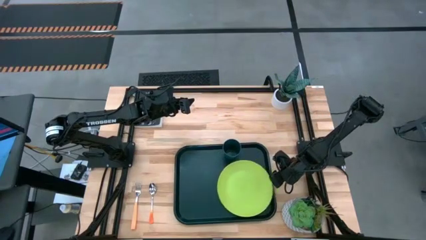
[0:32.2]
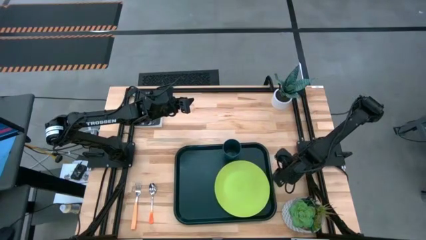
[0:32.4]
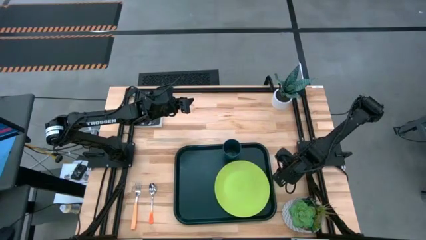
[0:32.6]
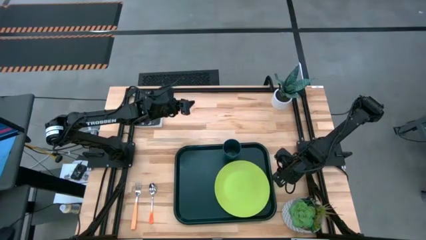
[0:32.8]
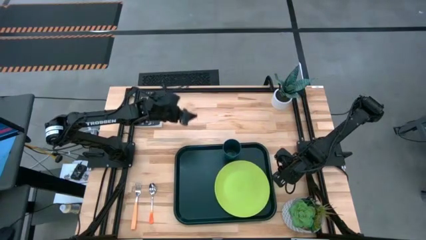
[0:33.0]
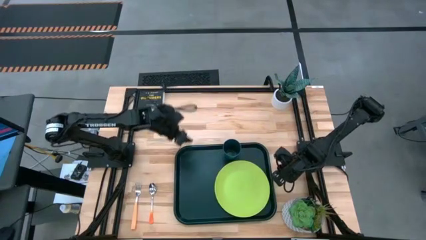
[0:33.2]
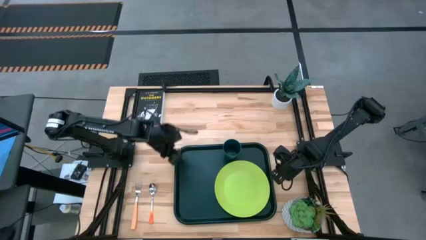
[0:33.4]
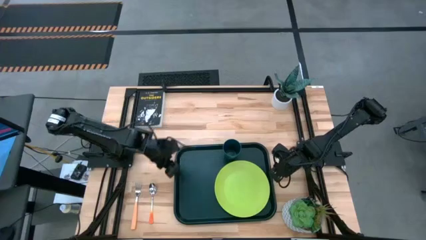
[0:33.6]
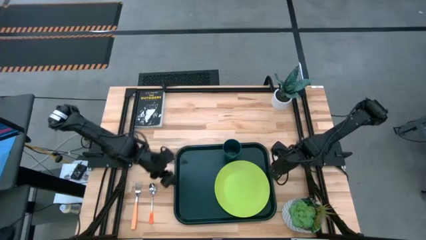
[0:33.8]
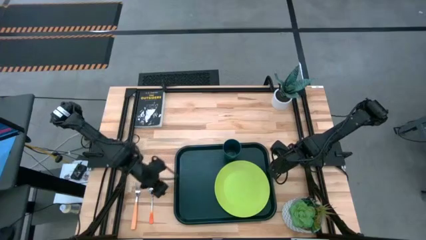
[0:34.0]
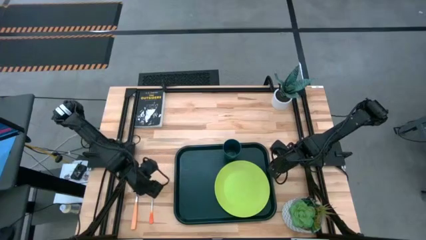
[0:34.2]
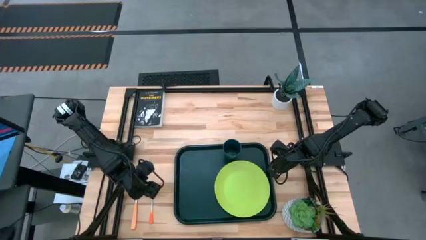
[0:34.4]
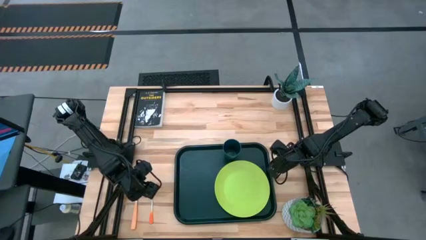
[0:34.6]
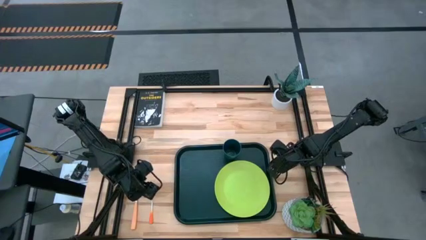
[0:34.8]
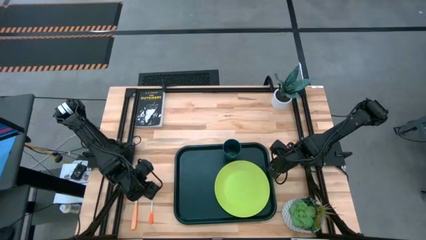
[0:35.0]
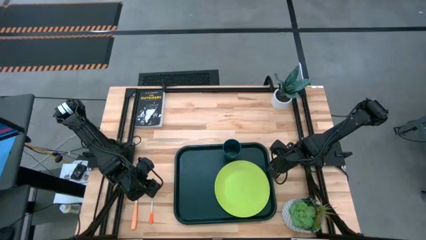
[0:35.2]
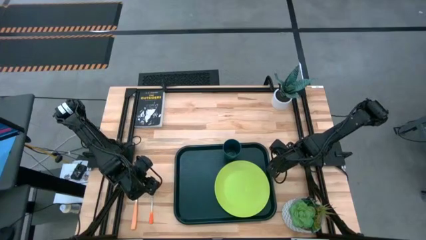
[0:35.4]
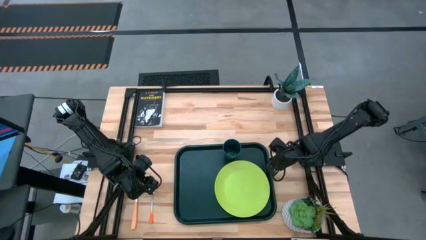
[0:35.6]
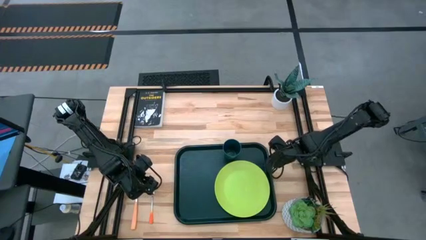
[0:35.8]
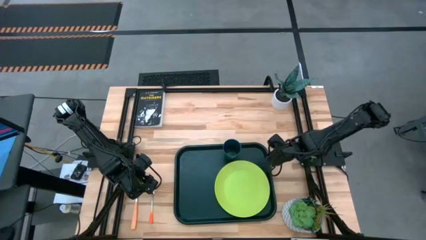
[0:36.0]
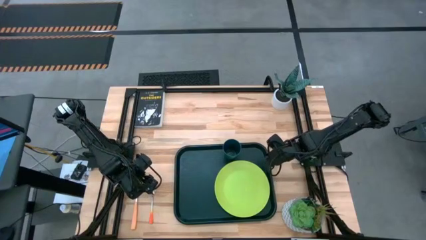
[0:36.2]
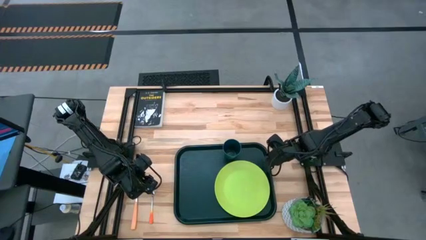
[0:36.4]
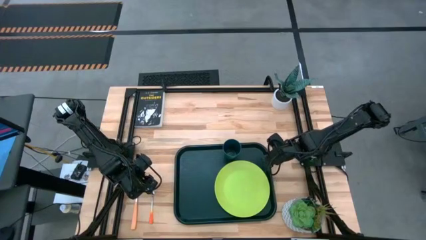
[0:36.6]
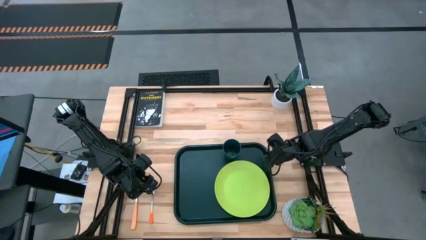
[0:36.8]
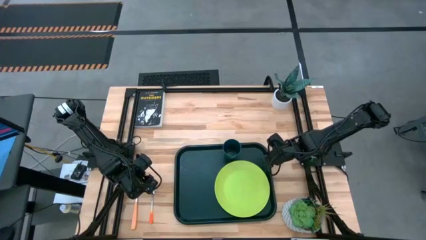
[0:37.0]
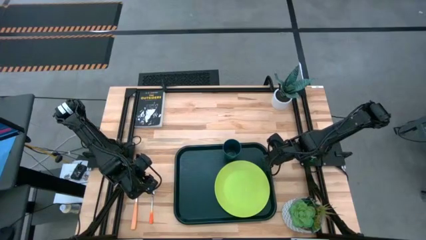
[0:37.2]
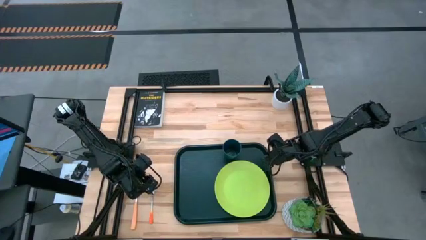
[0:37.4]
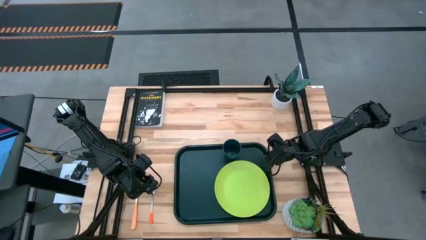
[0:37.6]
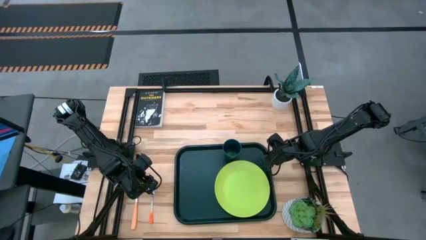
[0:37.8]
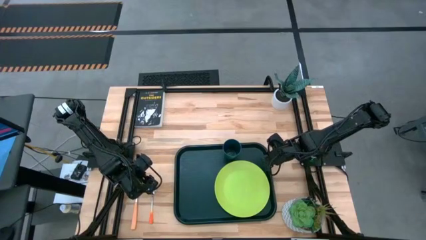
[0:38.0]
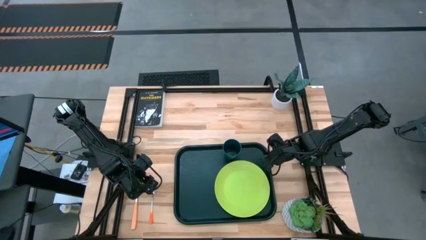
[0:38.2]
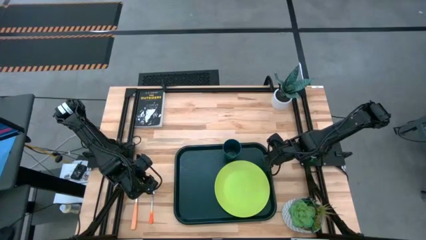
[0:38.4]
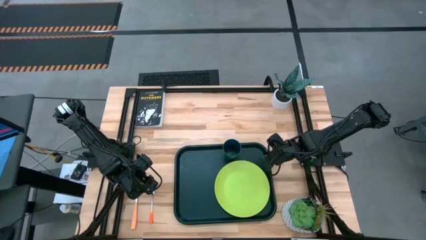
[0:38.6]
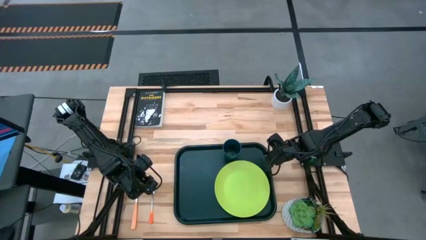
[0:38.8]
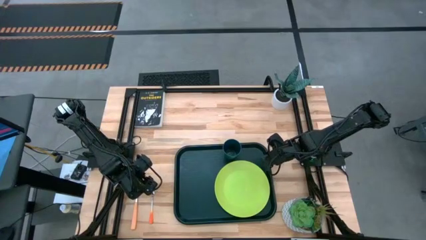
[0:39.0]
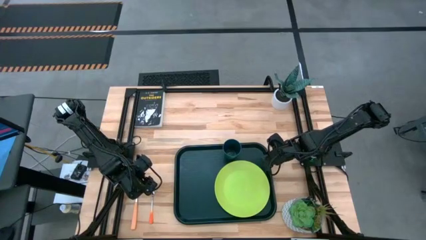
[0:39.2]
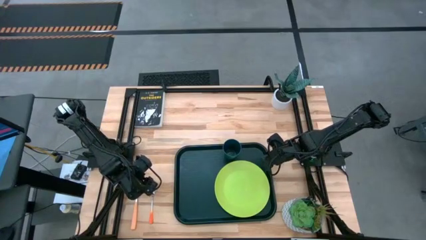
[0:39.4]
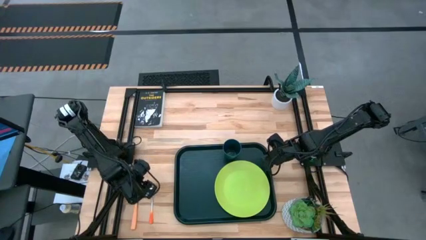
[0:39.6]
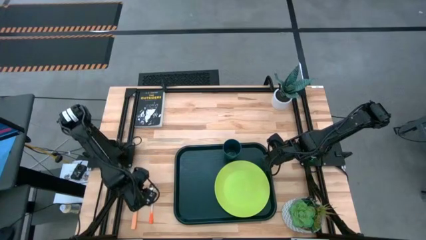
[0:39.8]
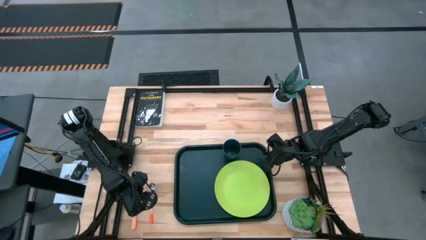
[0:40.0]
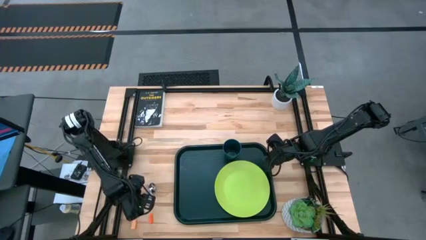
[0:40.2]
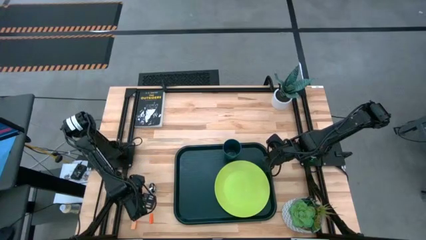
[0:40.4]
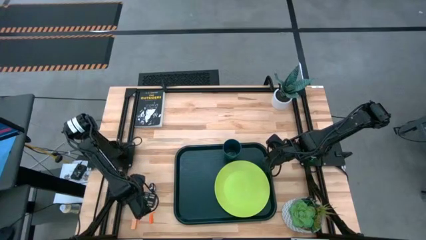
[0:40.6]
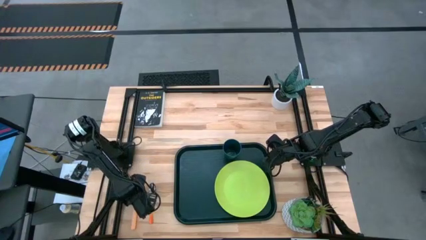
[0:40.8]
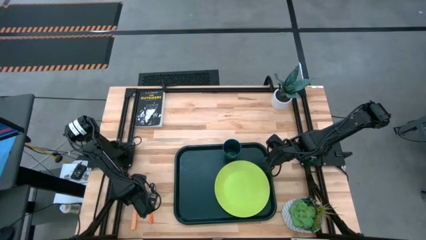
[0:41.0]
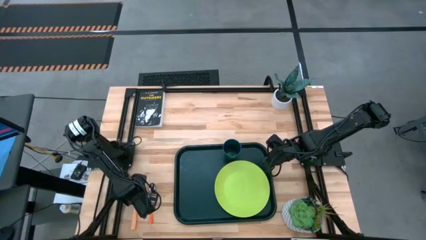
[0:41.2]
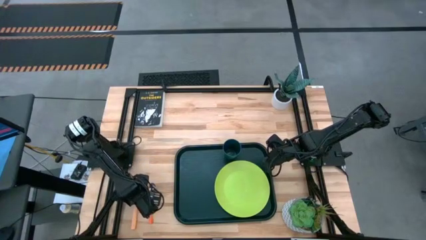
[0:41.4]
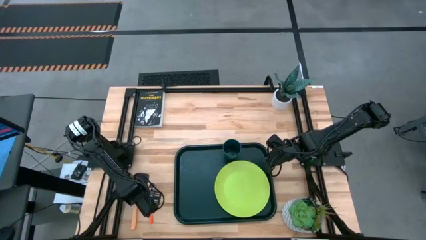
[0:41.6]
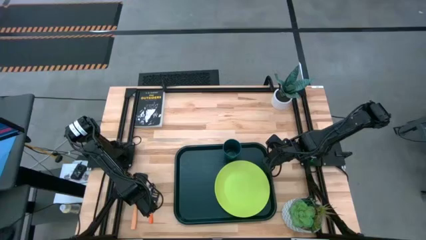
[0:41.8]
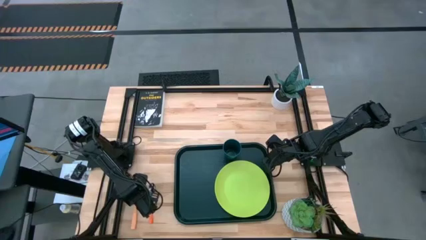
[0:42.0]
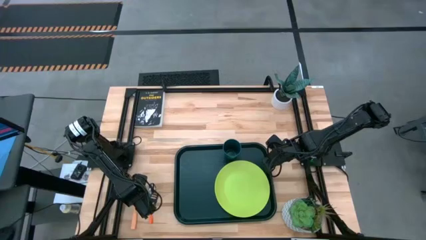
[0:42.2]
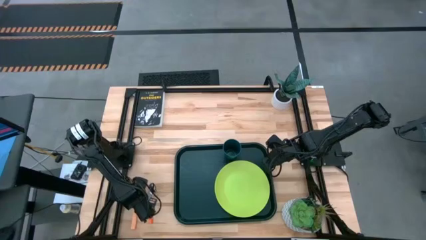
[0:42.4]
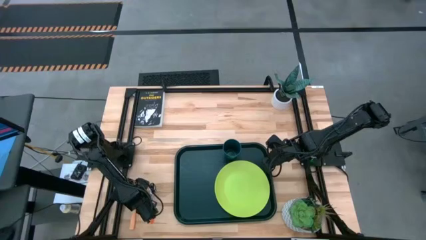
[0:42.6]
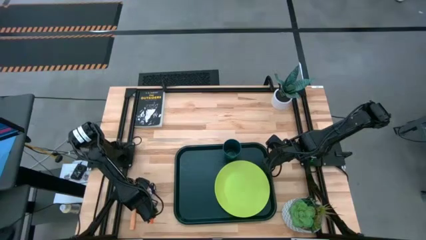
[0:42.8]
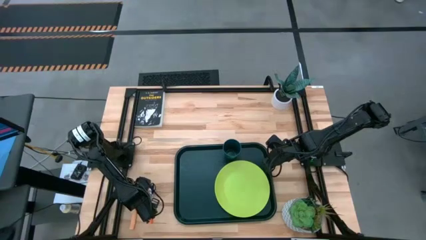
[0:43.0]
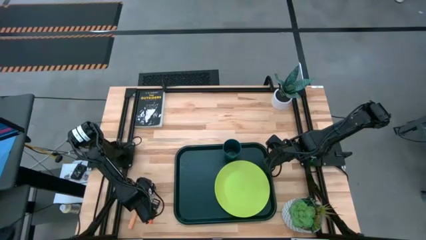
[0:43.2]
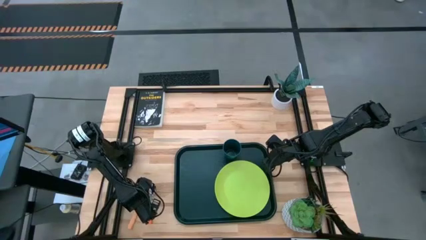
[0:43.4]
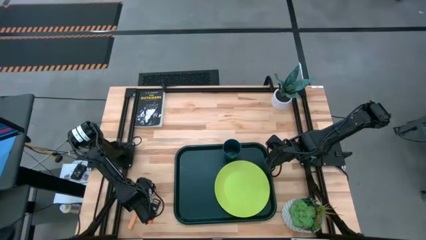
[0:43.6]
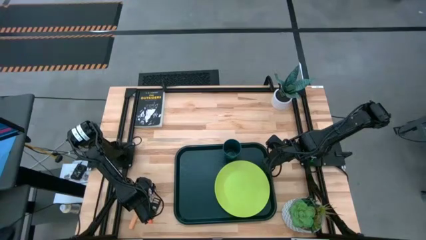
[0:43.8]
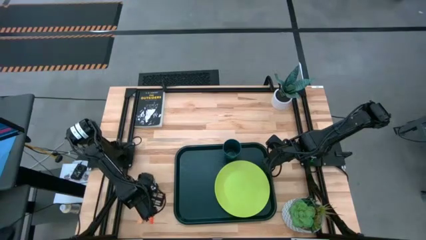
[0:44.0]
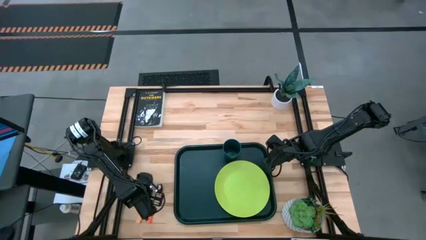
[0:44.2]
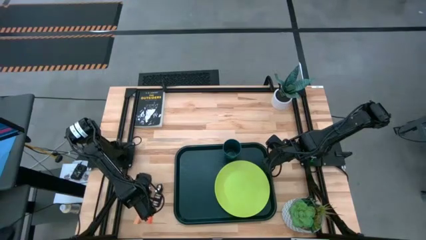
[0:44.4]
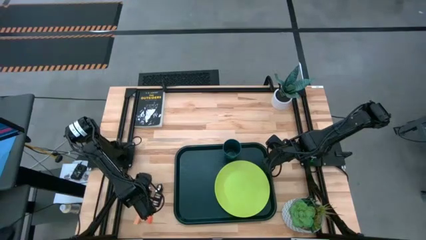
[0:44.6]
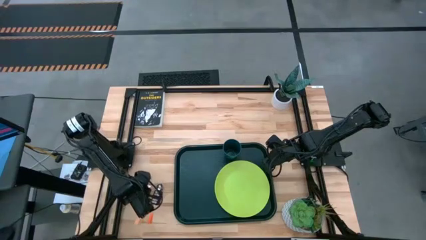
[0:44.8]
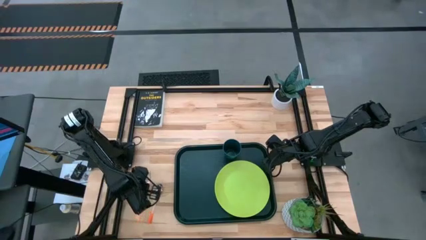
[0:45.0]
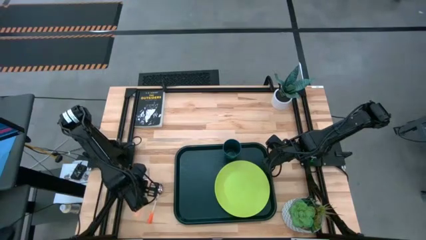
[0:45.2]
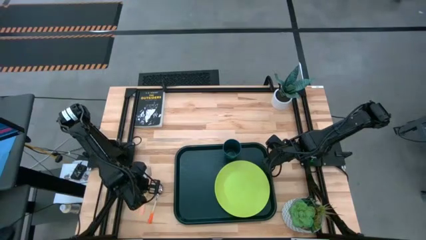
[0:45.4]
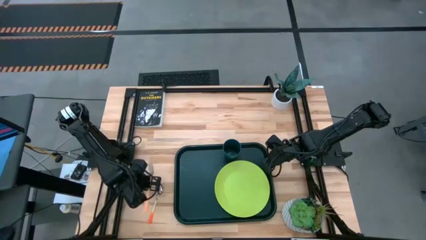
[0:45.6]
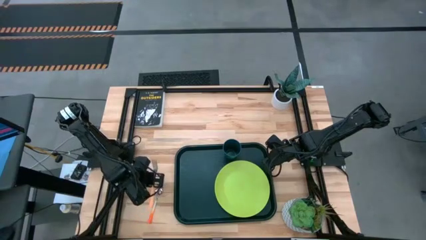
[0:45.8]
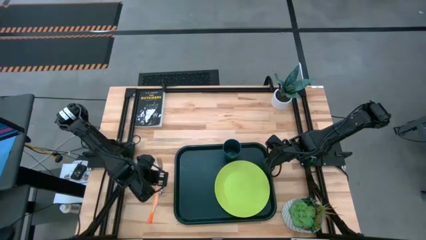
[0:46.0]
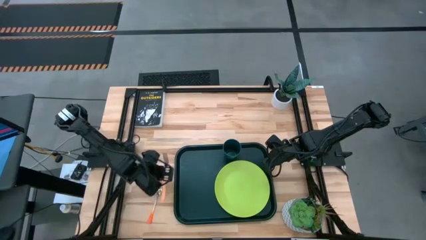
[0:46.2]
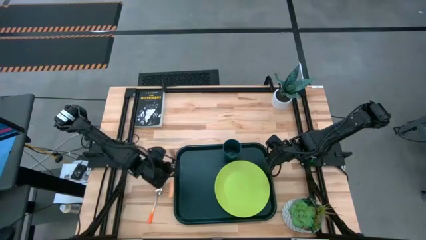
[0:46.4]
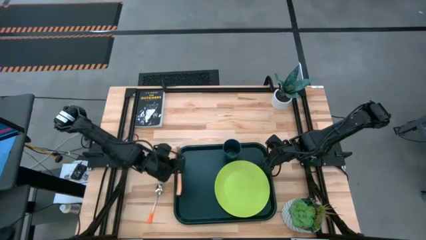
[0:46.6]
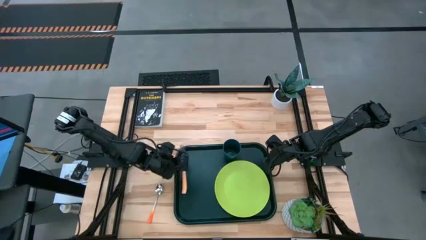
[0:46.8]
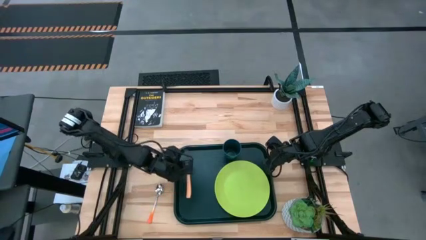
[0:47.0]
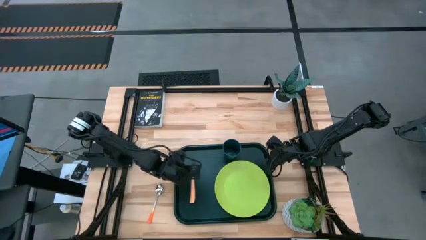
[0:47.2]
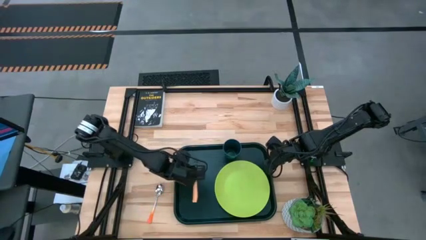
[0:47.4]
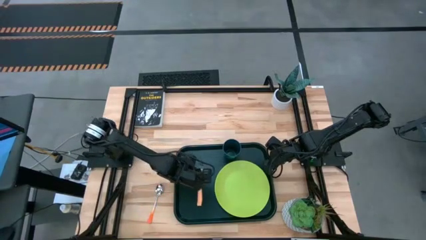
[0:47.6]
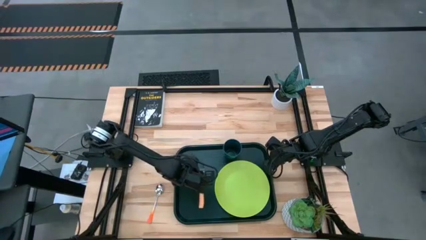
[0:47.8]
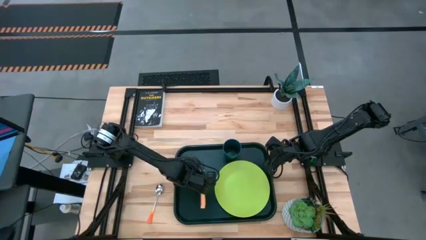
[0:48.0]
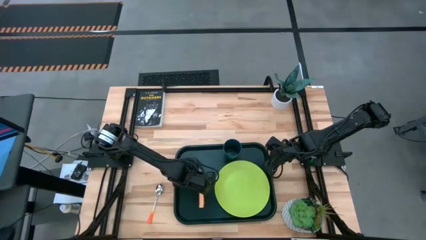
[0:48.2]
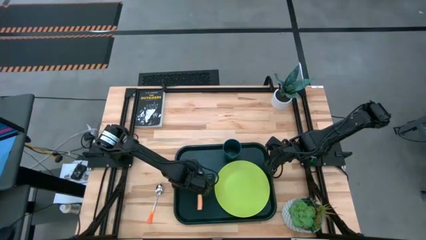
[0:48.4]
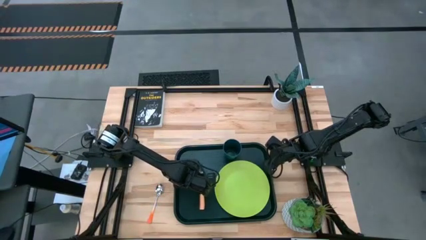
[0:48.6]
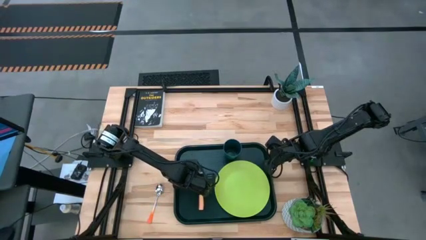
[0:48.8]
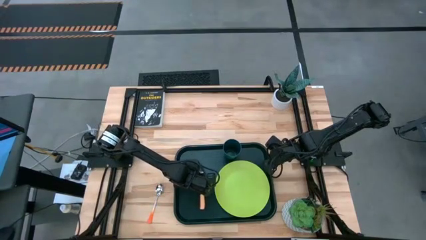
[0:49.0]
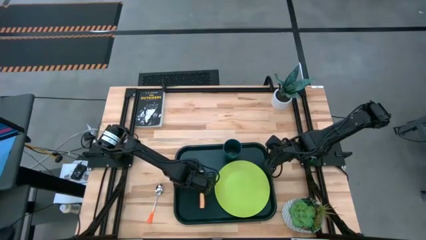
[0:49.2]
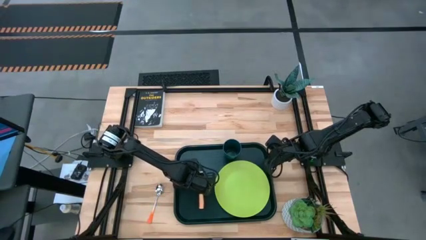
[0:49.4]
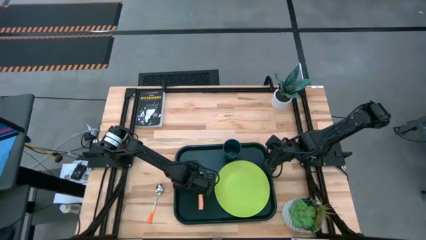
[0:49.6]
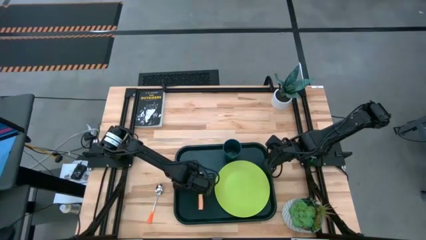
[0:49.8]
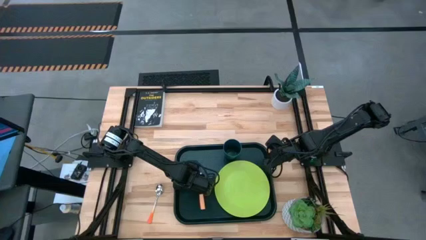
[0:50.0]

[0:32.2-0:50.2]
Task: Pick and place plate/cup/fork/spoon on tray
Put the orange fork on the black tray to the left of the green plate
